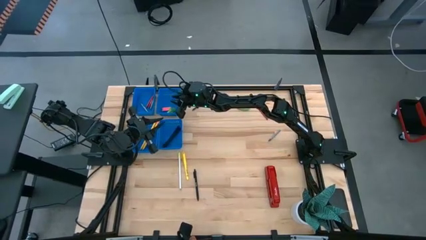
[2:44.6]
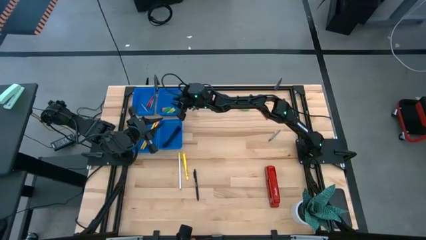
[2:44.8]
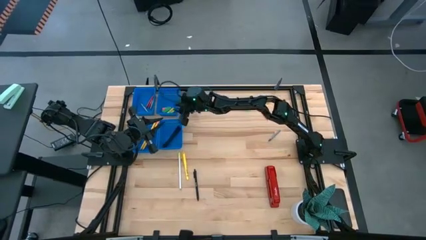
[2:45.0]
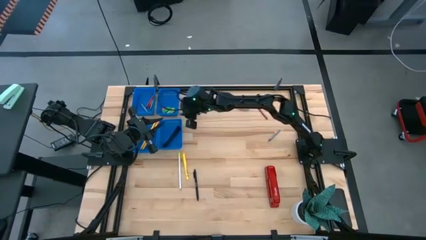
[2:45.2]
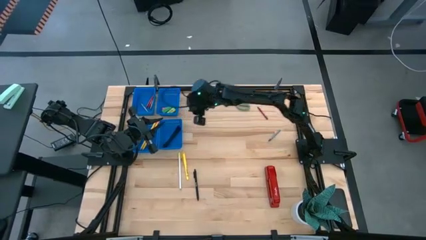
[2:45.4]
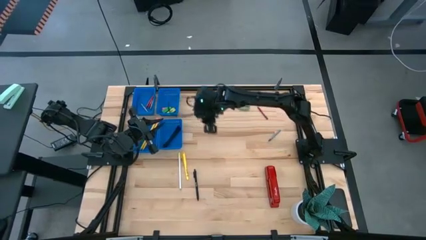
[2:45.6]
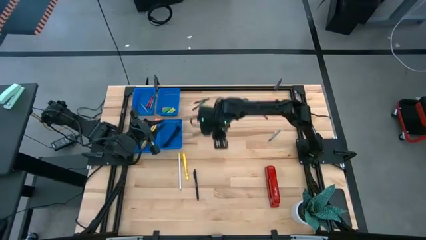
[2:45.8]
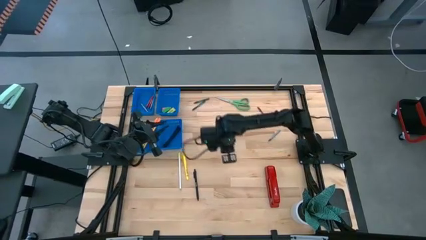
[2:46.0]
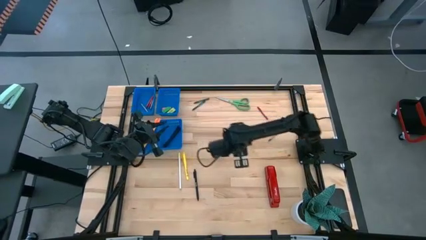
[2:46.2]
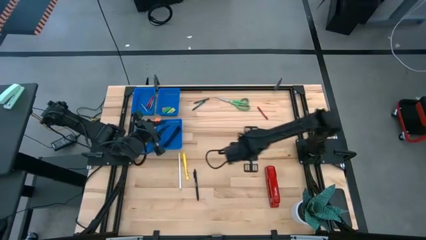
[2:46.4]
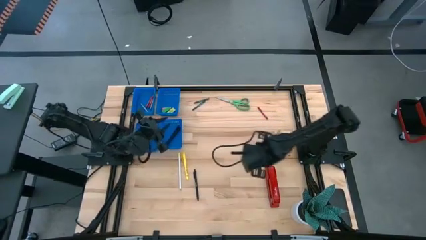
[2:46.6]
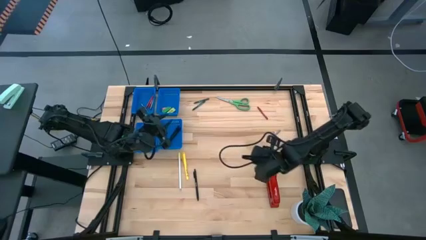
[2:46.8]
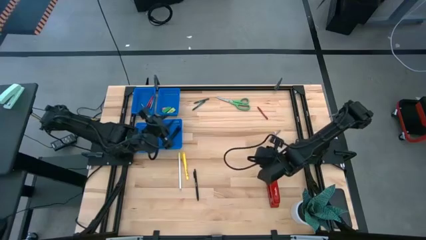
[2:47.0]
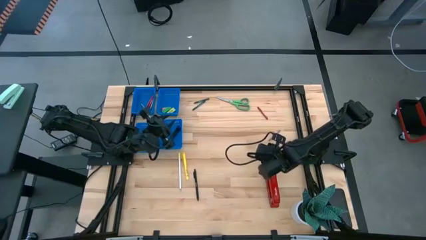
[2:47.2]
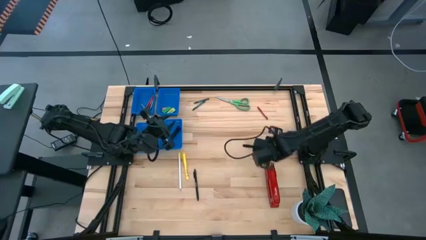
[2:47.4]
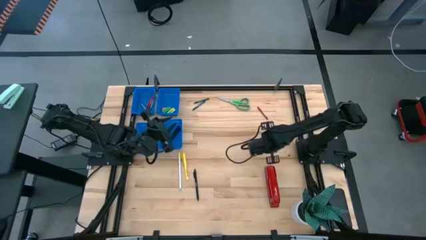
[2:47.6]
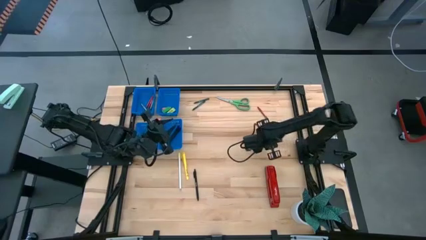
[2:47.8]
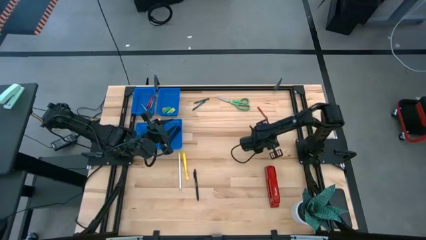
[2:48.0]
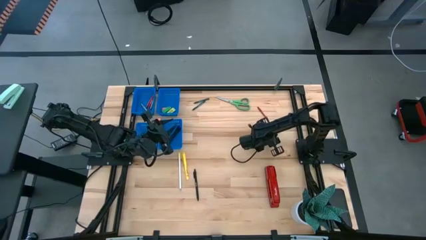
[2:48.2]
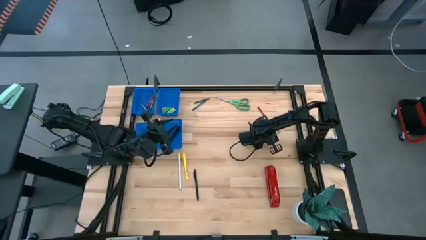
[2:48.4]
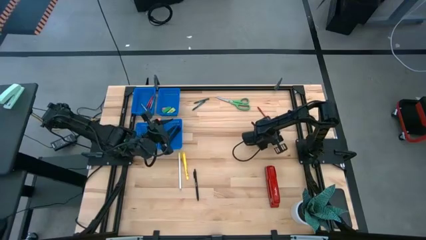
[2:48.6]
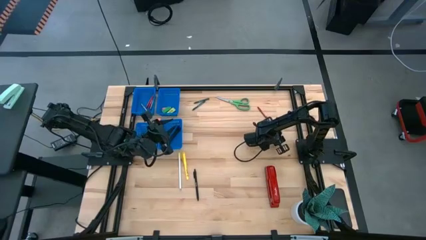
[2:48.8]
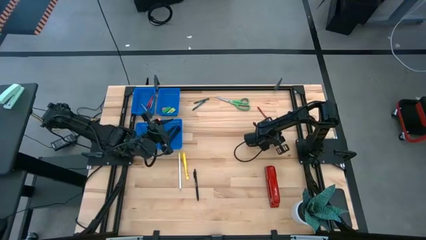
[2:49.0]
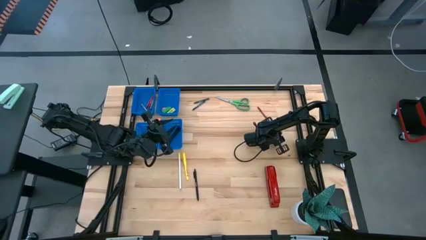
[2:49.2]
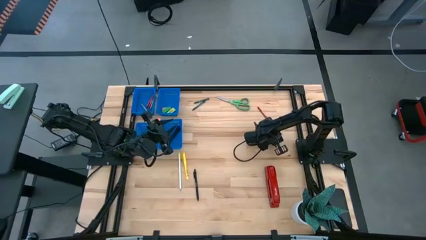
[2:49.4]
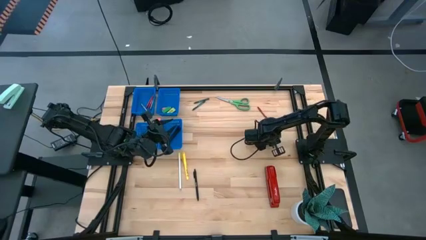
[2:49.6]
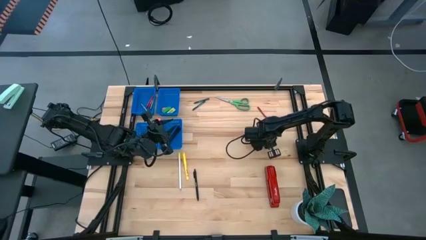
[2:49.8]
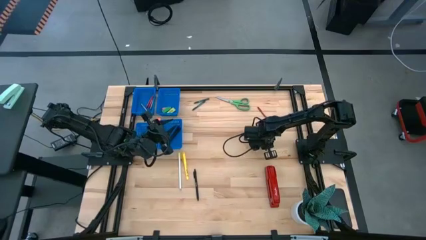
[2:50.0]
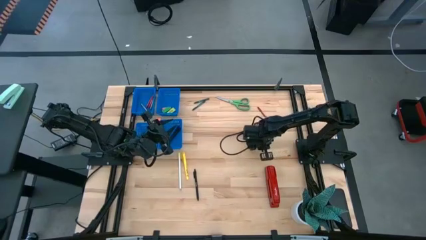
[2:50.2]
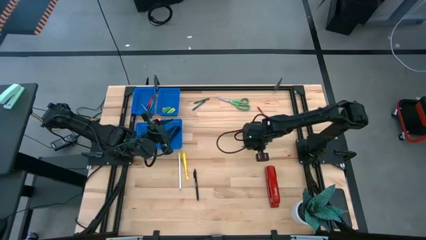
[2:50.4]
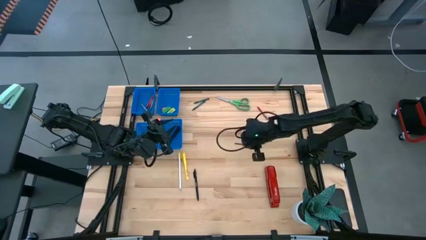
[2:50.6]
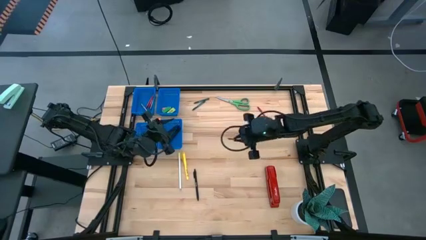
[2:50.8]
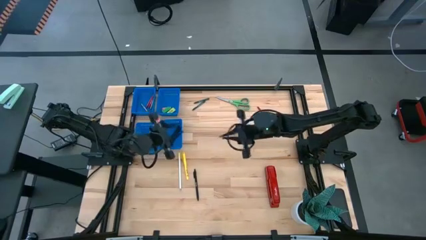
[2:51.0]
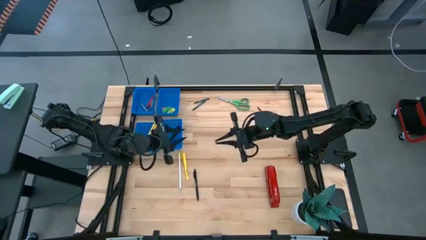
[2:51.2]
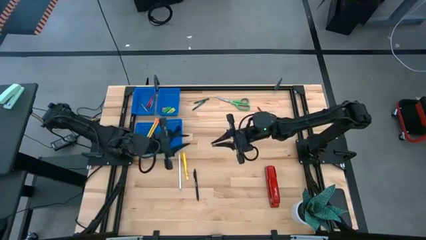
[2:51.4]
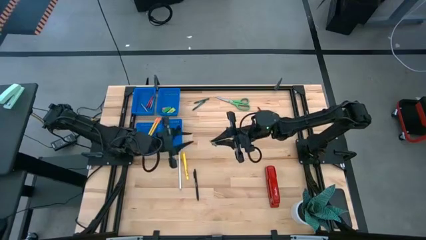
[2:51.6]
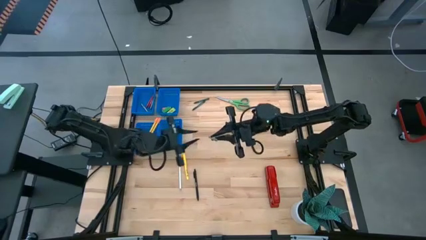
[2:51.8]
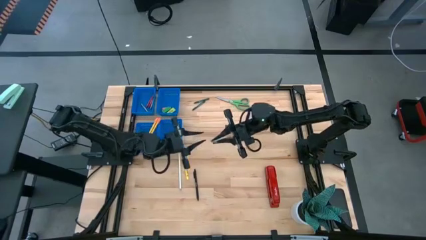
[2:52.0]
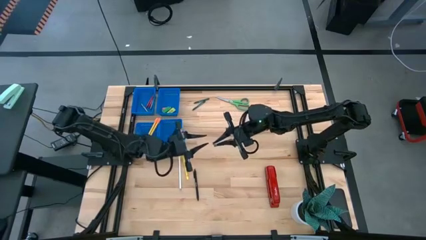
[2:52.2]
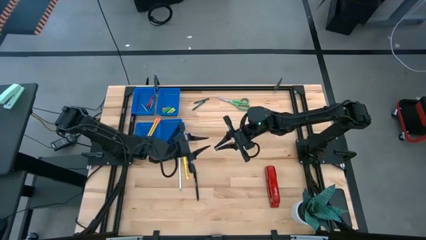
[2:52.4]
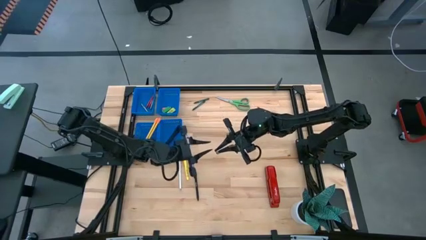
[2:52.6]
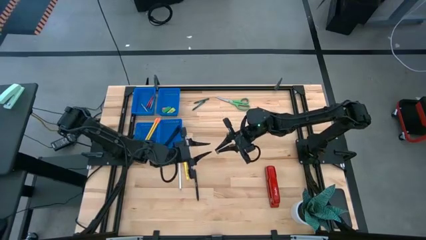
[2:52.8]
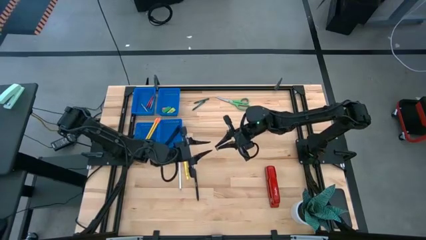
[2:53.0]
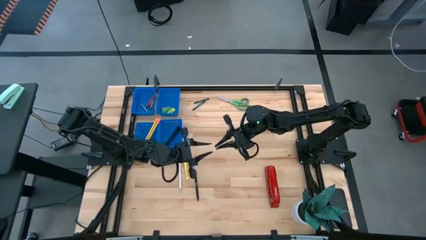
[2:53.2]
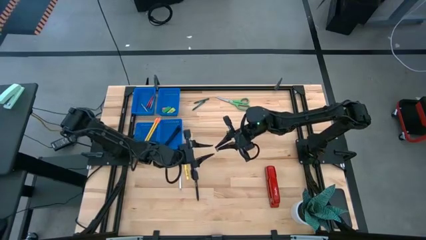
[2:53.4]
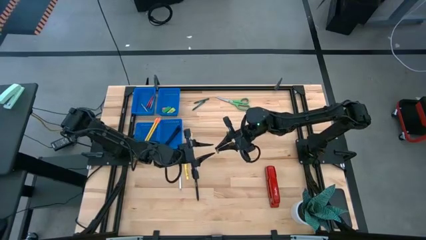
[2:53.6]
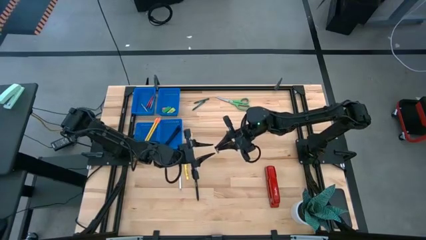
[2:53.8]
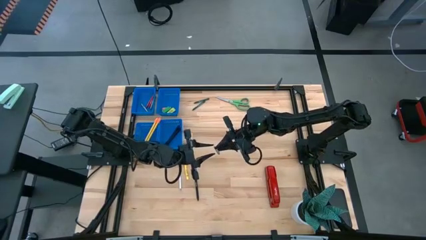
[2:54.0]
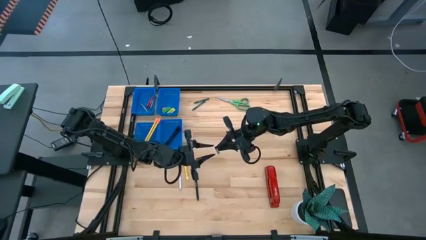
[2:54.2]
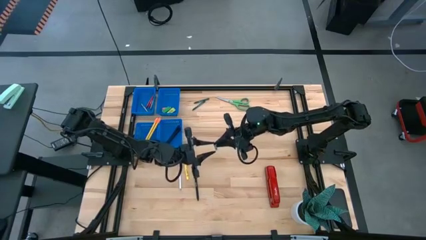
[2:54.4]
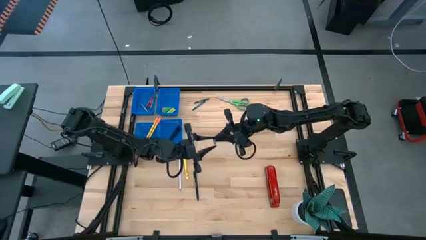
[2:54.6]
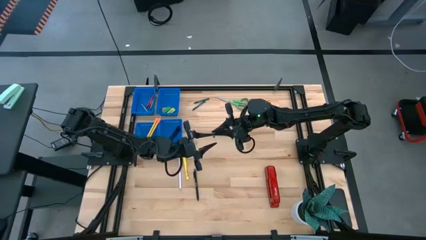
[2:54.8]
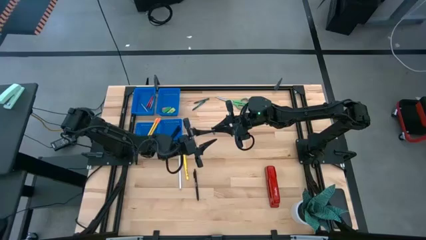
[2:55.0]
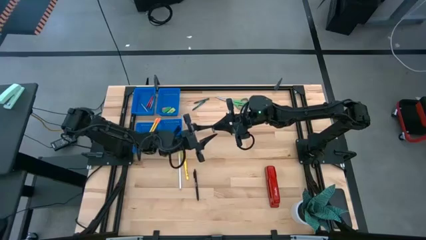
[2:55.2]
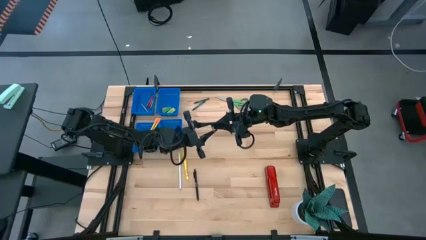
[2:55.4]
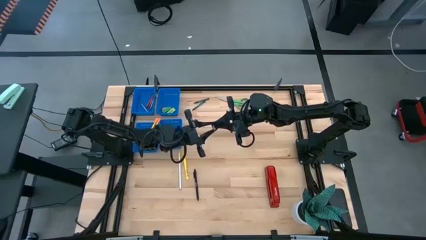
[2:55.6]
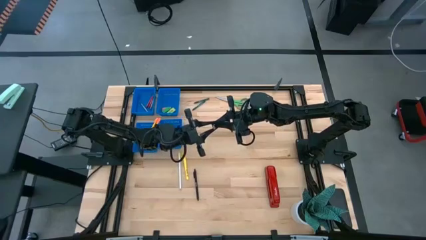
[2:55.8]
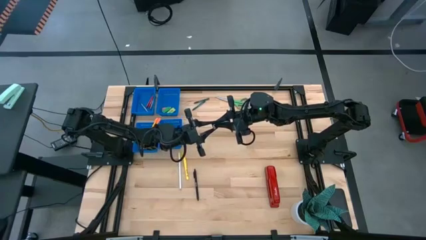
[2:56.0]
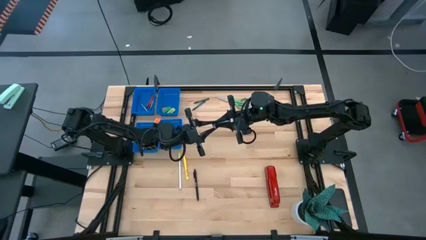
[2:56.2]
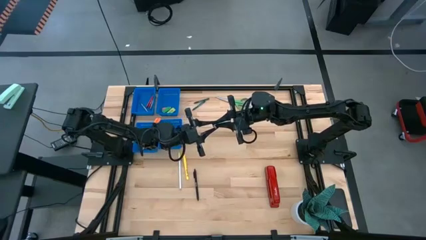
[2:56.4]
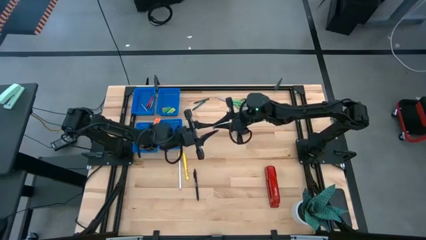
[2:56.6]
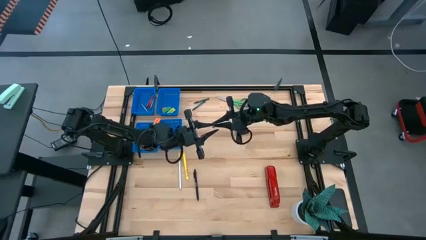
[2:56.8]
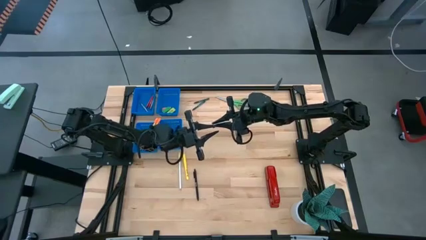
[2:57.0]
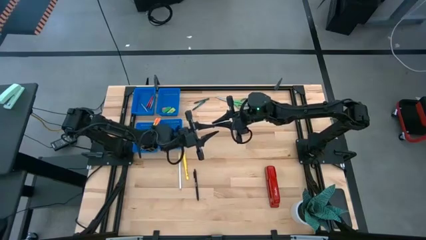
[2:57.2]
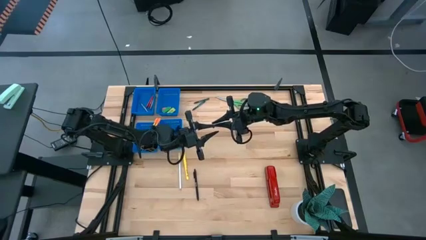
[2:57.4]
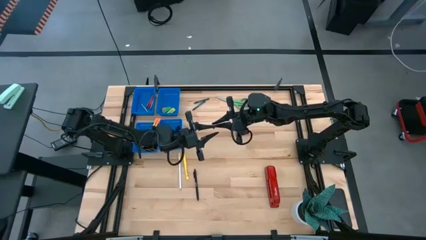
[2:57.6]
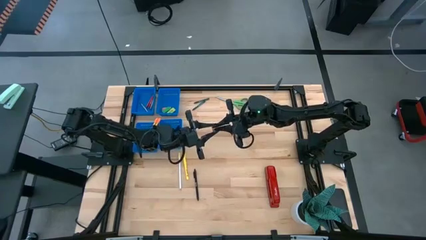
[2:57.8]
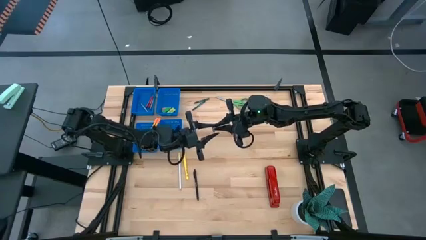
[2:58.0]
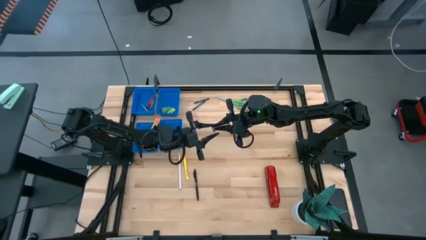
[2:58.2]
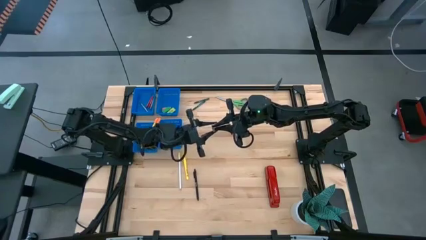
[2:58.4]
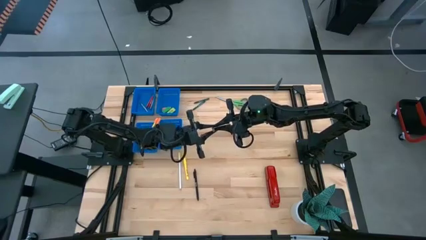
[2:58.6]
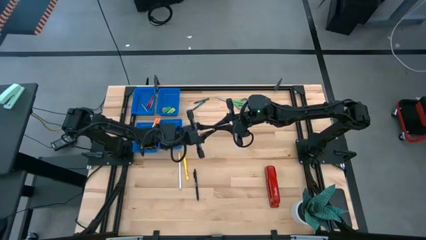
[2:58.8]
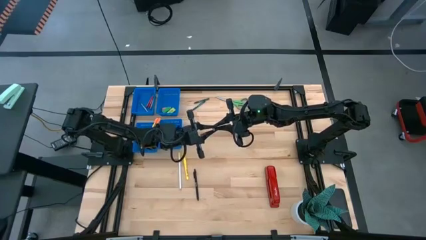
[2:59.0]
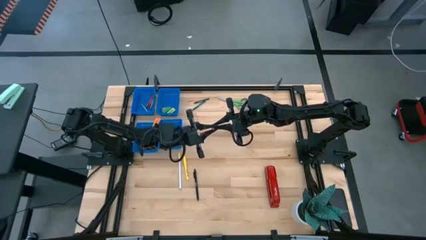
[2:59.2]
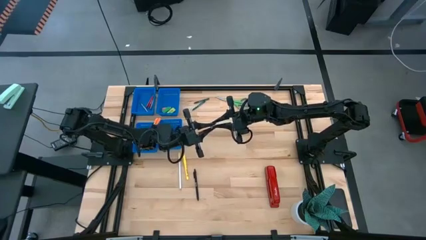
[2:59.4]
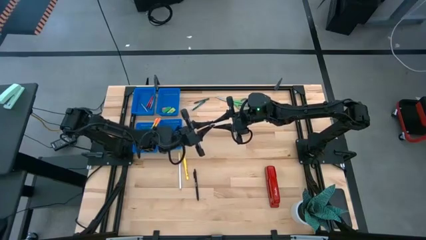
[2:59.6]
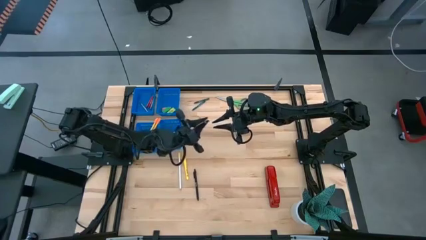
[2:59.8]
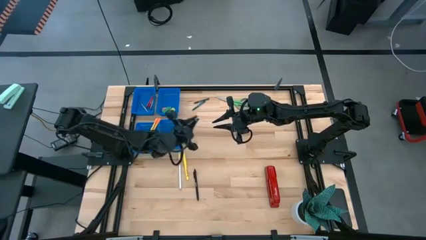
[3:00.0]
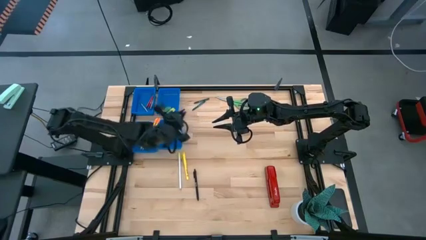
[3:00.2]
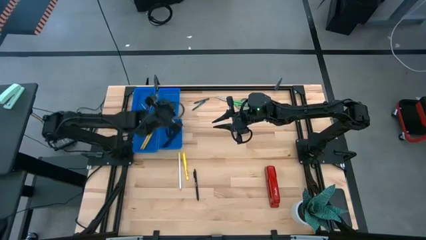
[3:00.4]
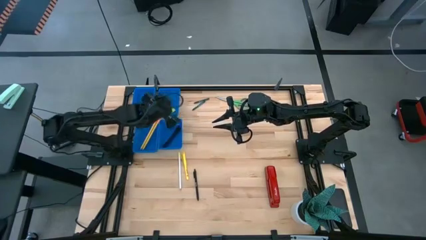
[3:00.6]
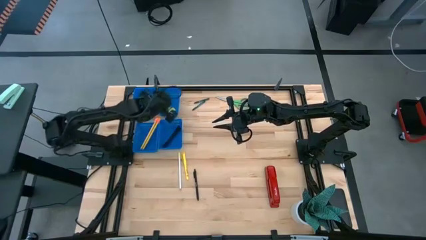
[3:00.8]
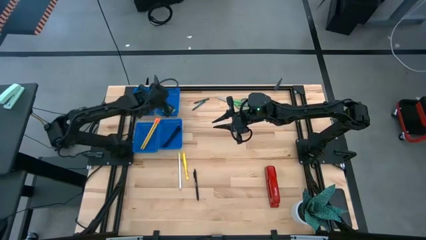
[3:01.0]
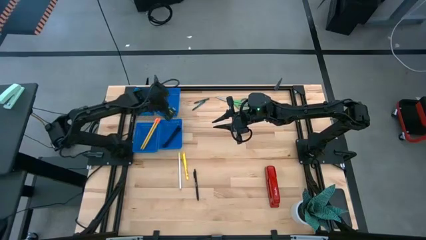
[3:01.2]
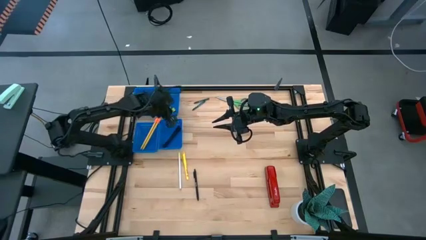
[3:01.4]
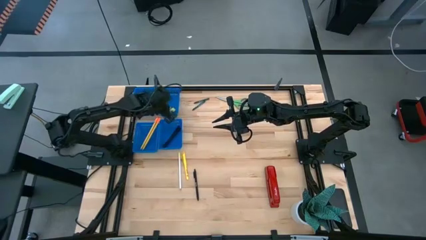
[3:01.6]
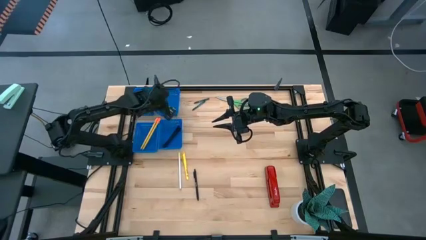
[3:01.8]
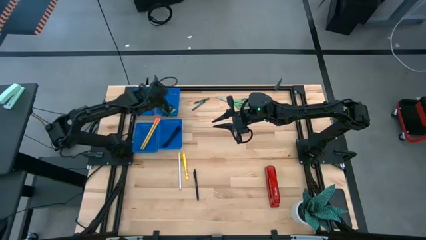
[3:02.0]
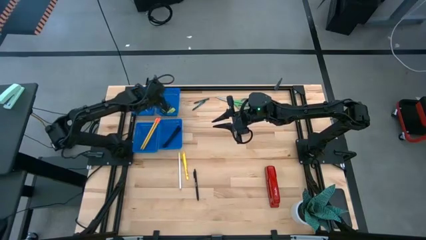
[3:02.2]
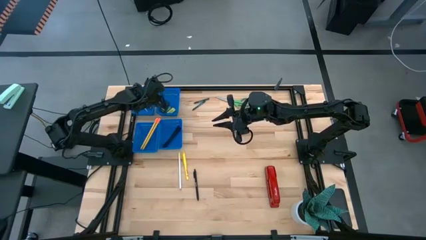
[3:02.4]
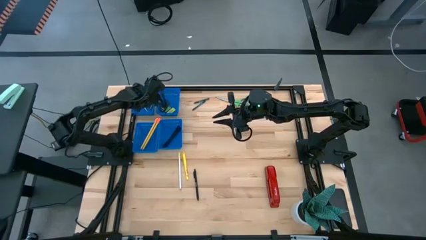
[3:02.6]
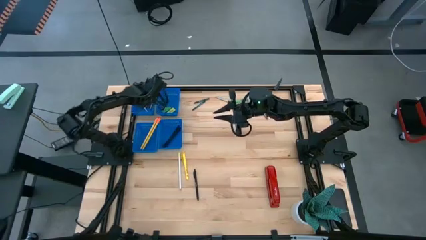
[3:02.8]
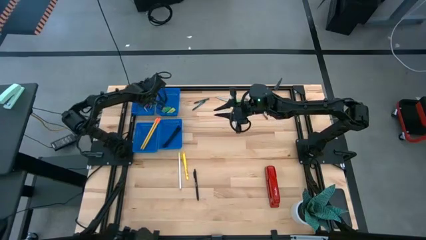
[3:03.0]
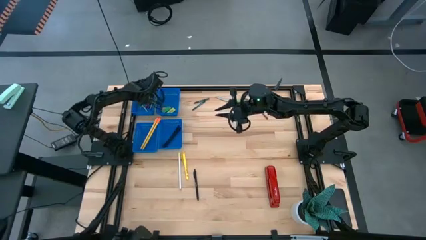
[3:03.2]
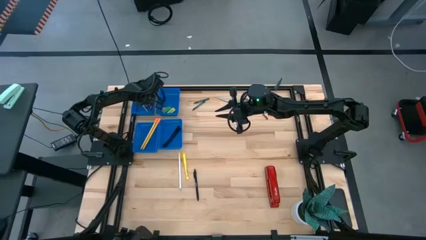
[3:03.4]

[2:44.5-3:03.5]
Task: Sort crayons/erasers/pens/pencils in bins
Put the gray crayon into the top left blue bin
